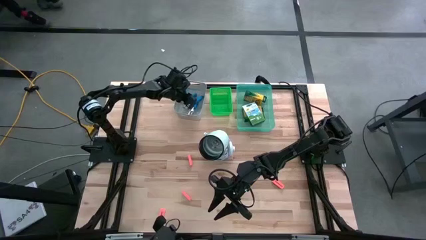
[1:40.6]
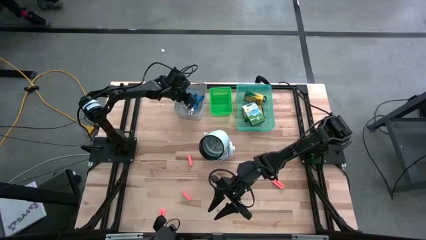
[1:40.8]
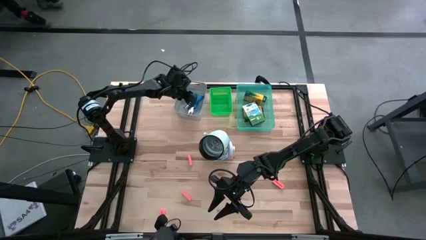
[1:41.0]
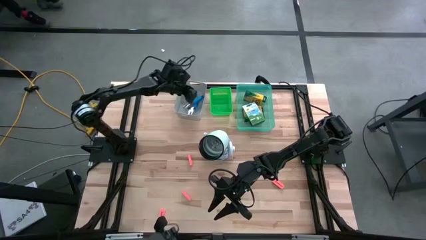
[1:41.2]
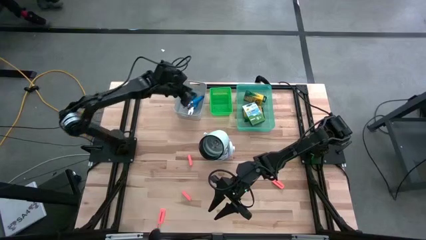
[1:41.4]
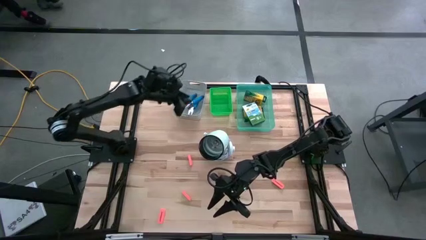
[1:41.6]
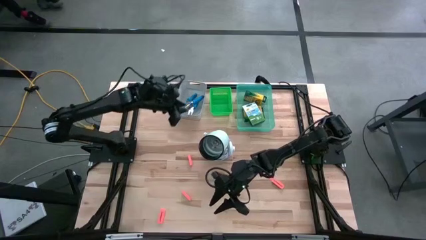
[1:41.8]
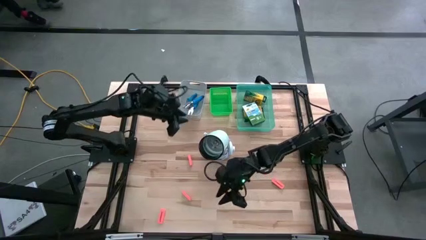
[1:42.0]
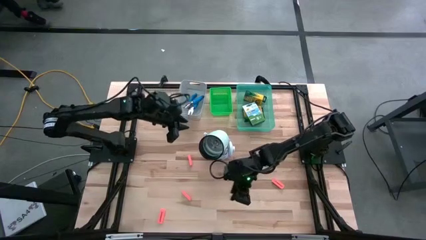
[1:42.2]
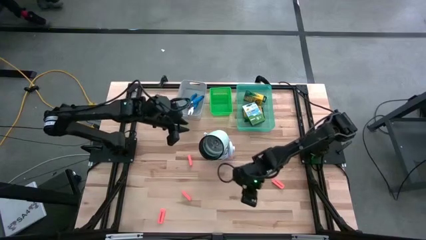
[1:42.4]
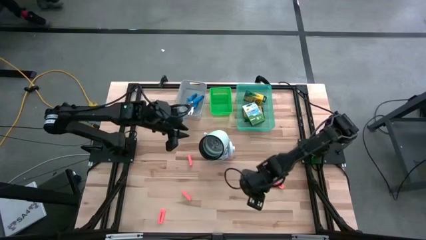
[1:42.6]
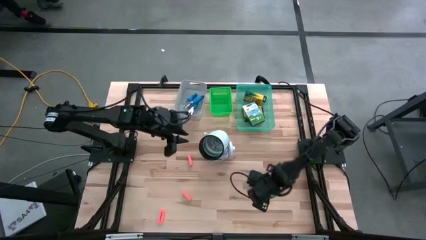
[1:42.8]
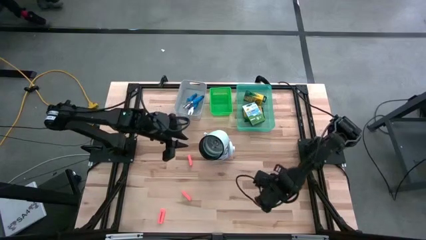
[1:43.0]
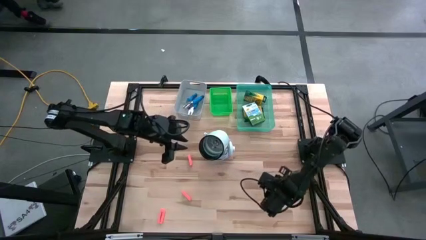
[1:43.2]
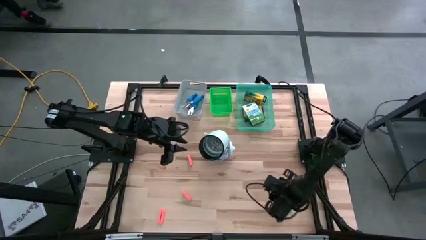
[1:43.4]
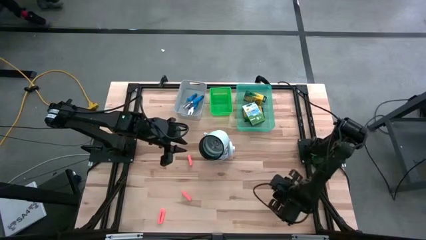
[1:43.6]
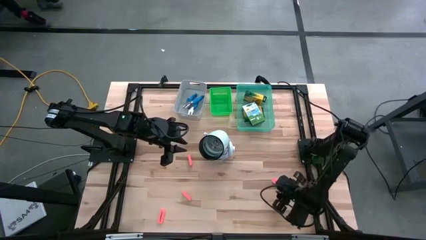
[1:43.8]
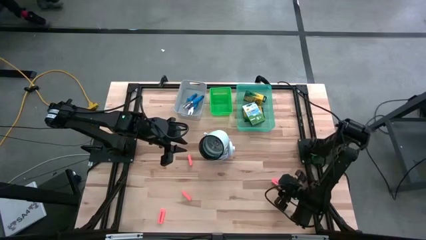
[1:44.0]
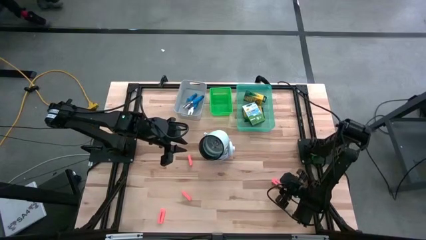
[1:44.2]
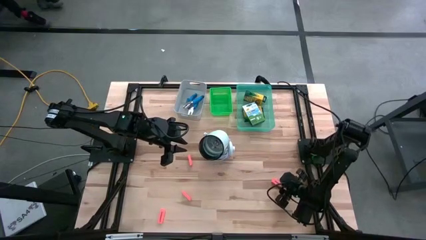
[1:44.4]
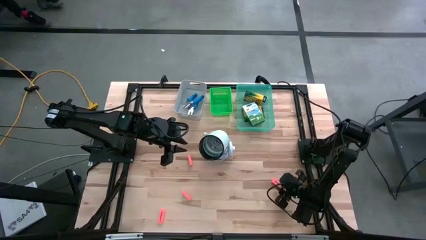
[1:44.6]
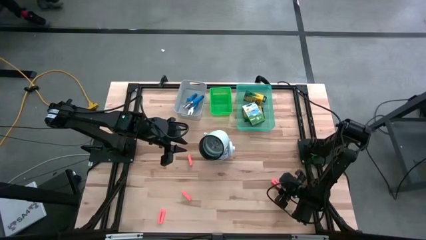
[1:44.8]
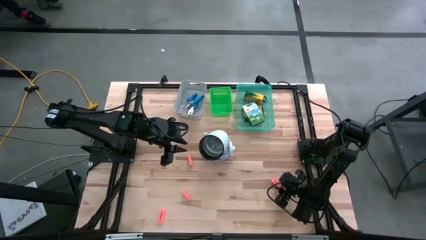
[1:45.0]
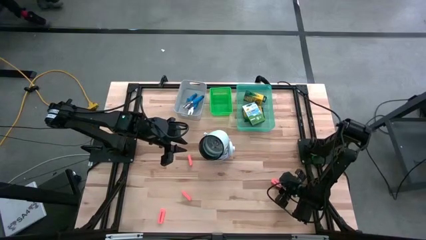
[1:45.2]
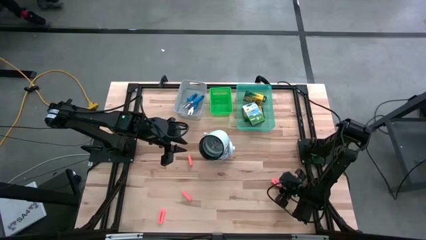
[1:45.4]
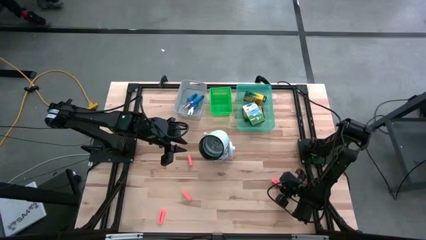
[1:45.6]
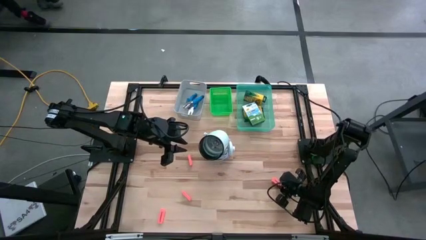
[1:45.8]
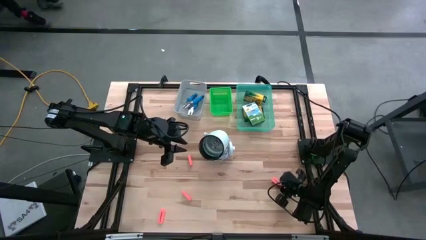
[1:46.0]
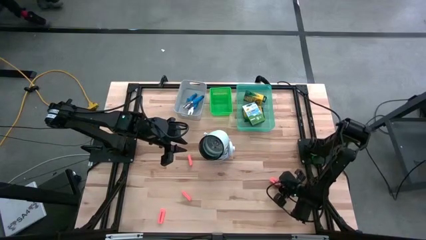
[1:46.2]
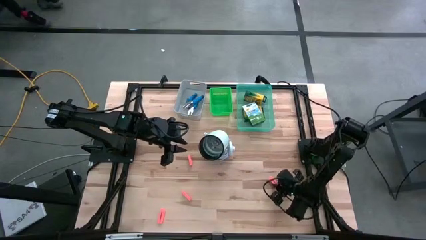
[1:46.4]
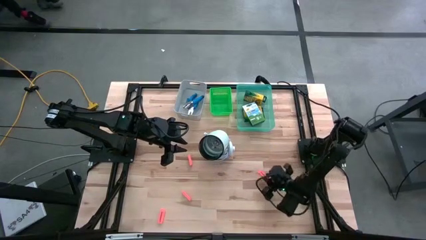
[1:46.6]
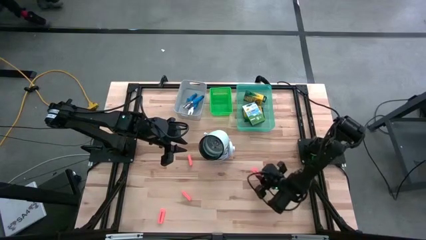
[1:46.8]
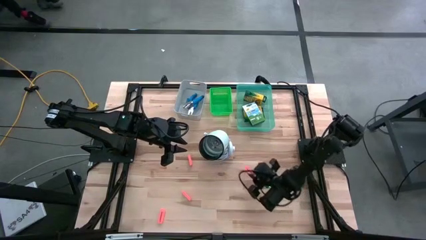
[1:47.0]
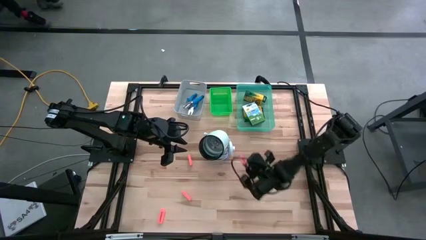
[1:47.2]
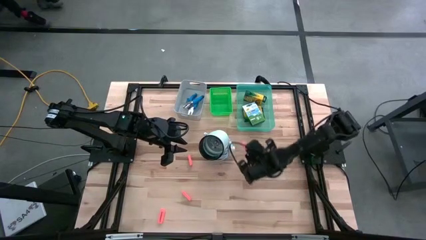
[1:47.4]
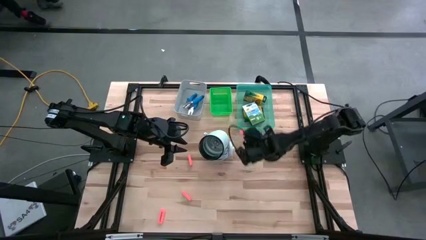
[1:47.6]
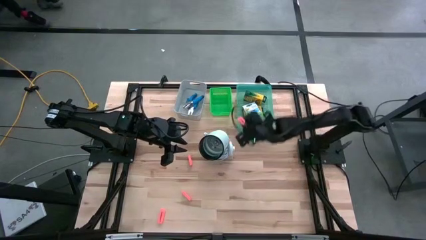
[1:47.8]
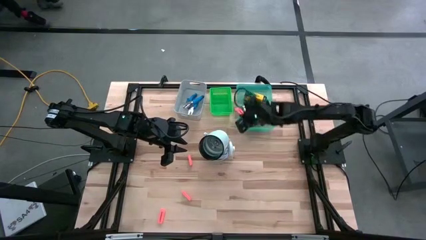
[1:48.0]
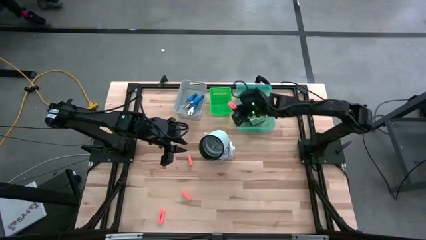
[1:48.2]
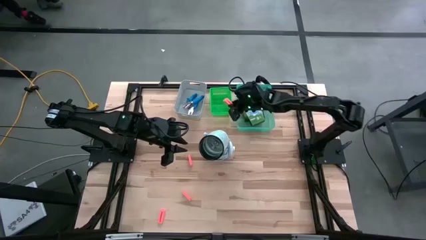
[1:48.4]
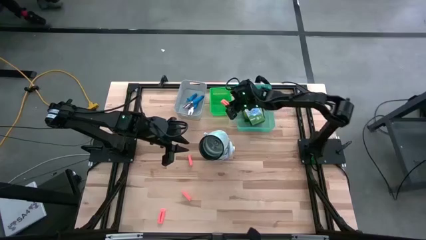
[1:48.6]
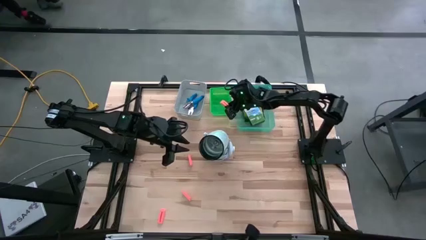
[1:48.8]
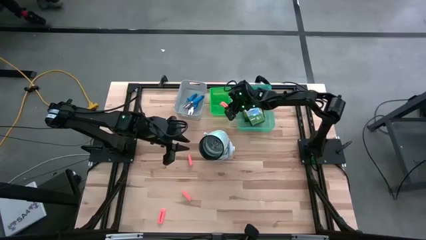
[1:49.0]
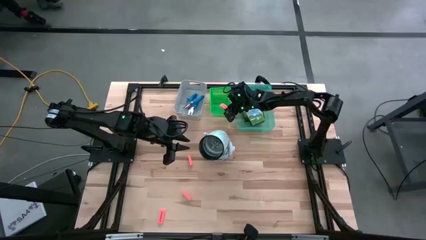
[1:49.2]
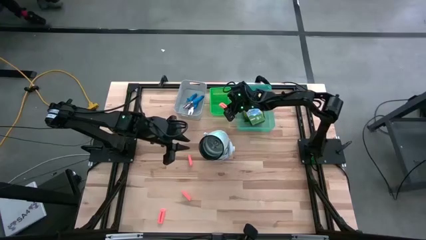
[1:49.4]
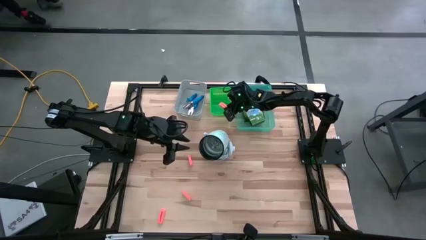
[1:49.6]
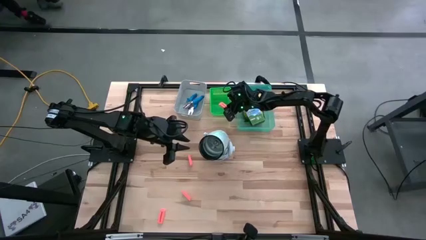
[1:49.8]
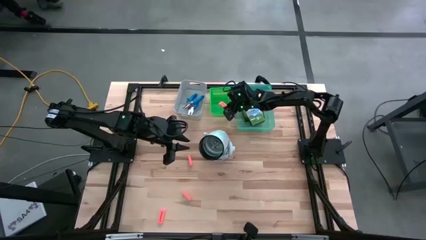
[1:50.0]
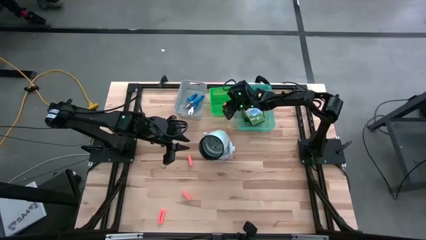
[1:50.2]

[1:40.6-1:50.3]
Task: Pick & Place School Supplies
Put the orange eraser into the green bin

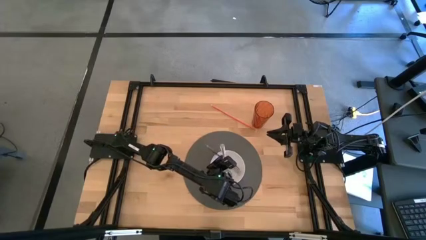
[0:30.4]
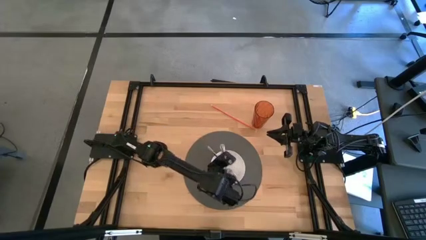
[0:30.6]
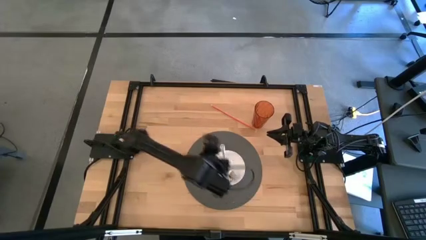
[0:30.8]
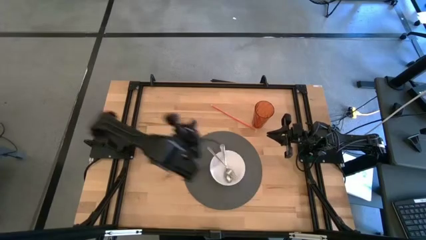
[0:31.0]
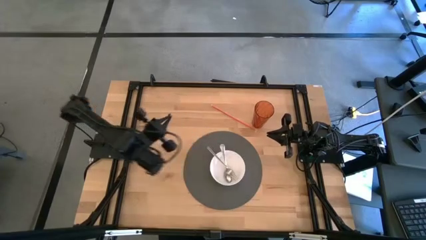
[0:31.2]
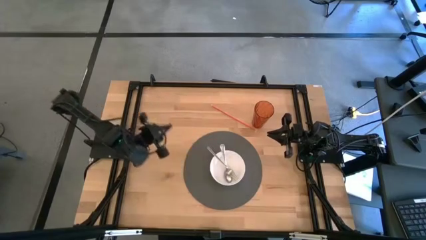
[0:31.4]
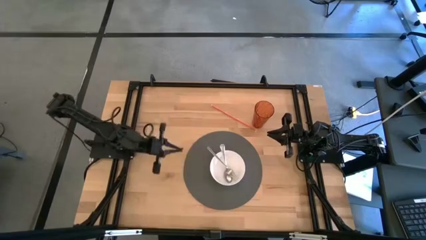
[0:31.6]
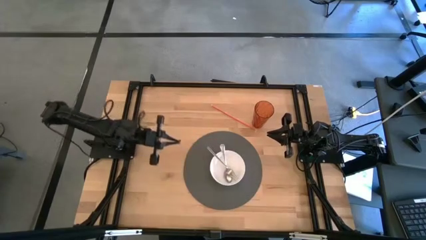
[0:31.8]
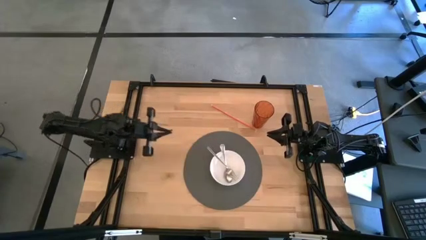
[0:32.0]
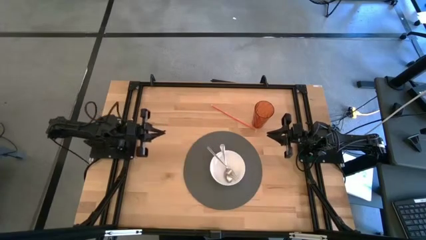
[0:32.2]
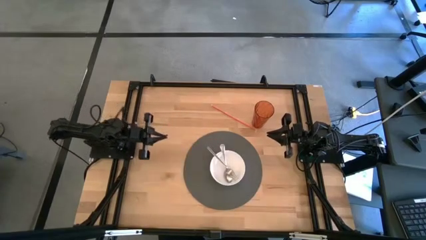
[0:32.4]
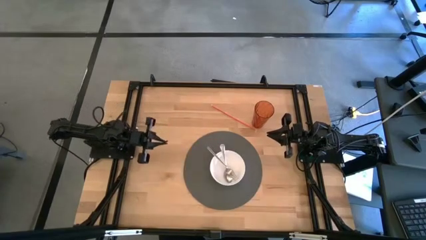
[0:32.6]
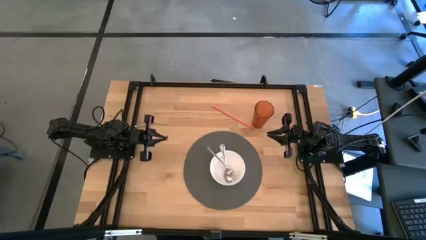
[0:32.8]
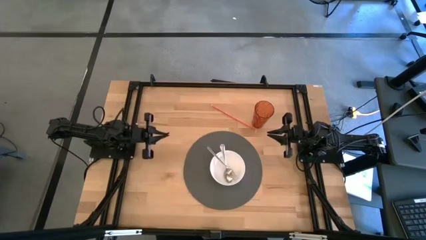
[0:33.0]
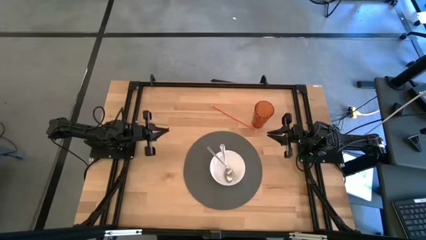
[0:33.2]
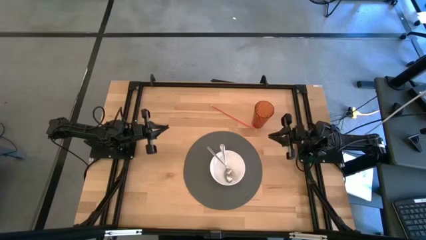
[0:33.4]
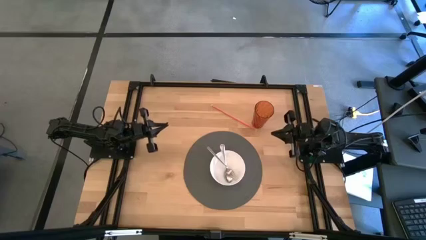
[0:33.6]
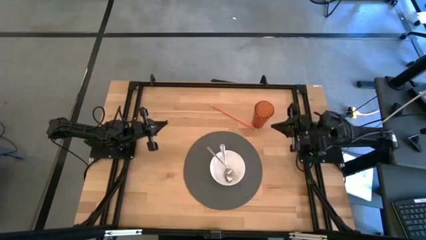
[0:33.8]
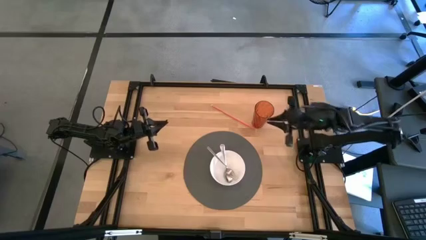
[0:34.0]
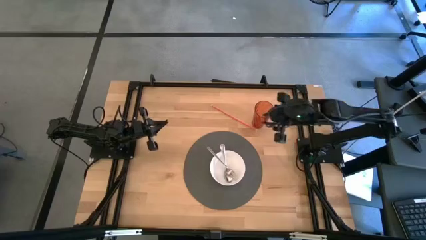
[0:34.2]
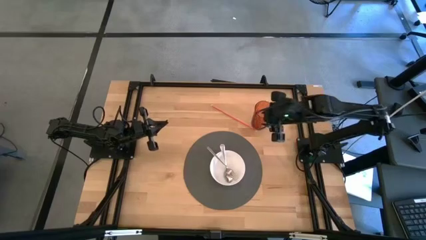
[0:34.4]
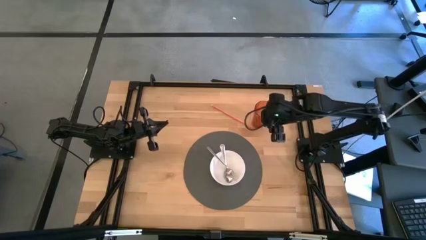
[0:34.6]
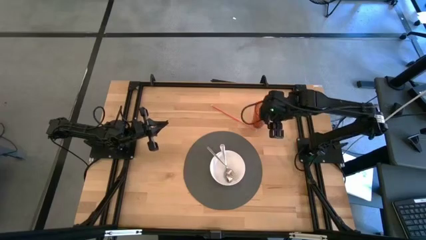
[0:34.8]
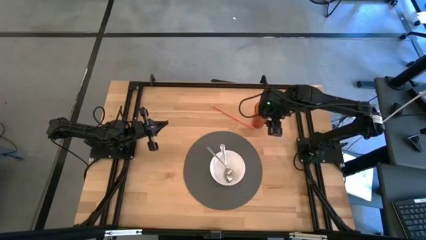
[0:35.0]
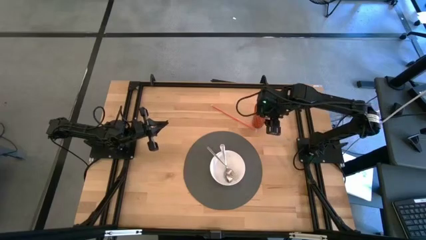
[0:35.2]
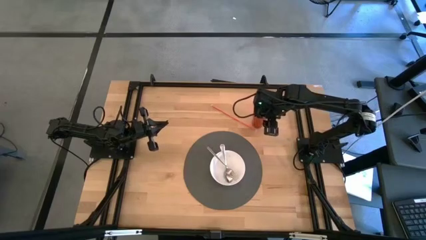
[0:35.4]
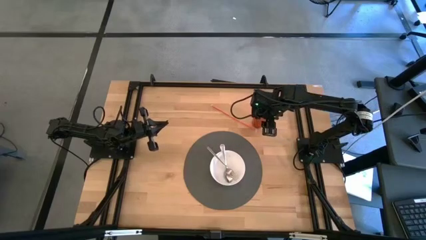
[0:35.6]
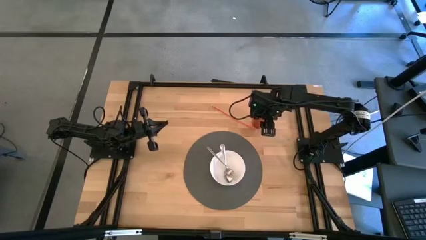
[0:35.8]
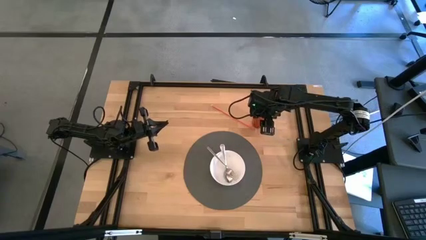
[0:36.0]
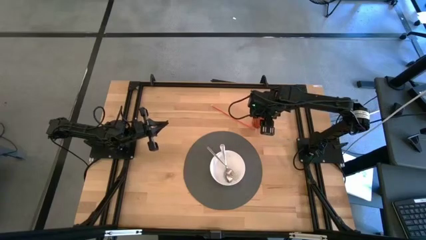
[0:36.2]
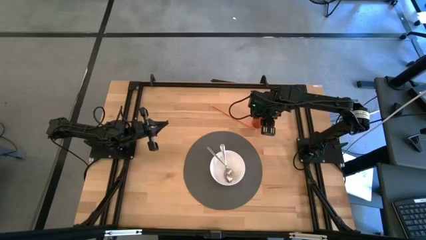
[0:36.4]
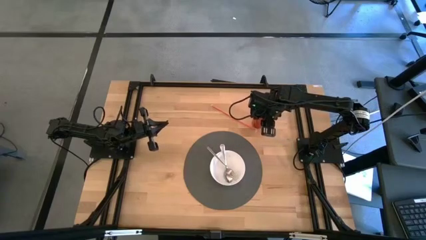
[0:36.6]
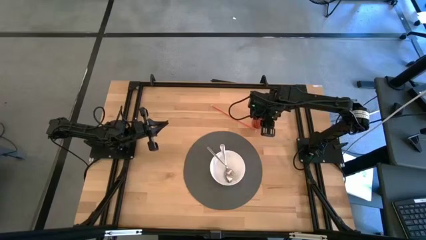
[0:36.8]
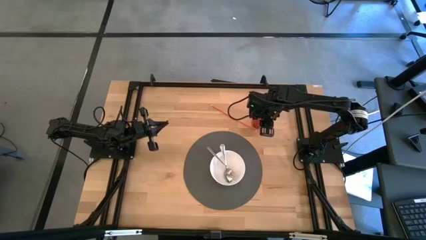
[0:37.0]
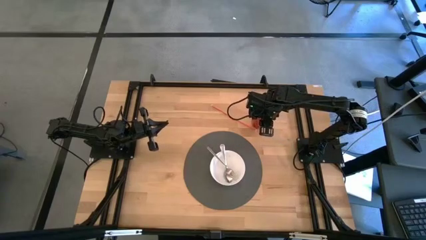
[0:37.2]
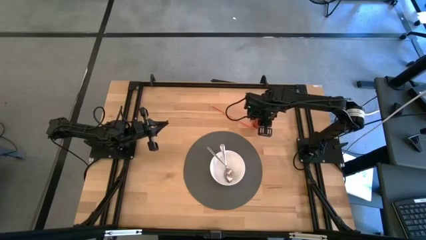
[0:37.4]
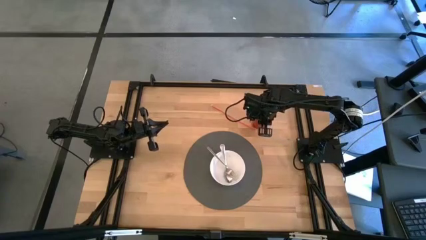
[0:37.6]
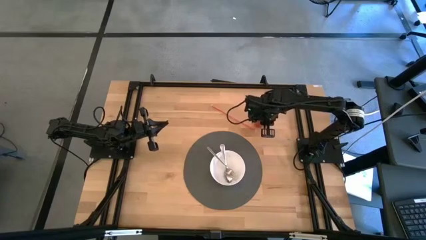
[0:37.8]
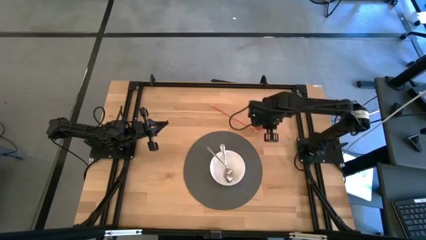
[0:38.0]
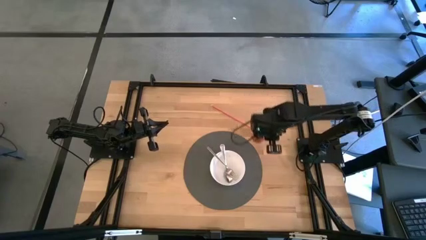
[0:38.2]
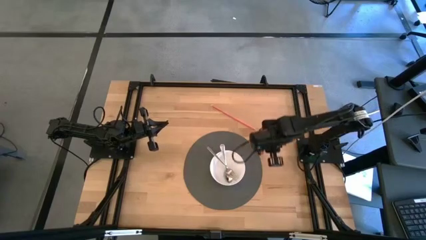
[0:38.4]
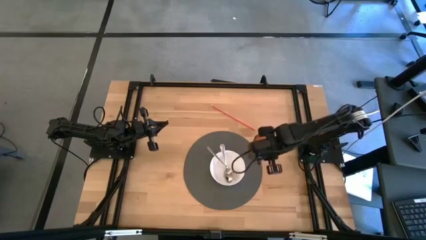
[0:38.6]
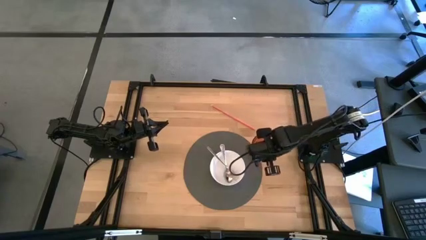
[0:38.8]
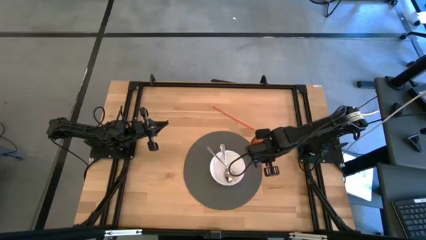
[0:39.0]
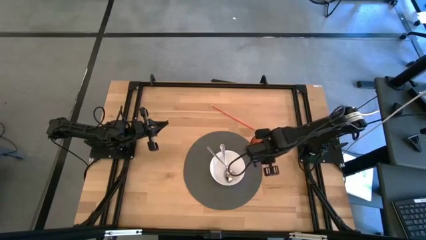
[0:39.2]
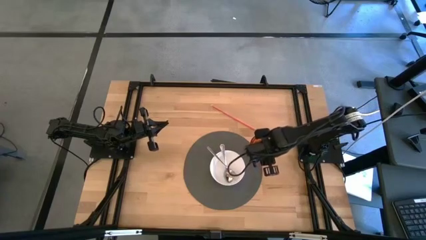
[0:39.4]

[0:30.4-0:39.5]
Task: Pick & Place Utensil
Put the orange cup to the top right of the white bowl on the gray mat
